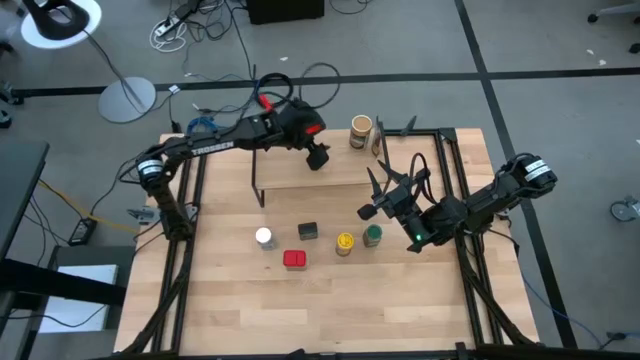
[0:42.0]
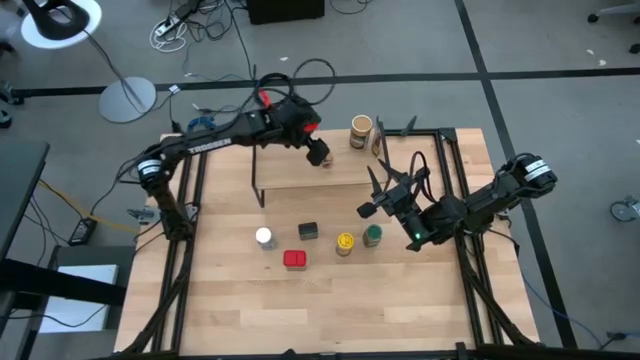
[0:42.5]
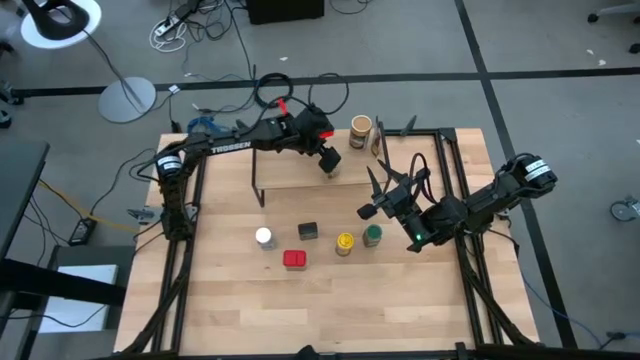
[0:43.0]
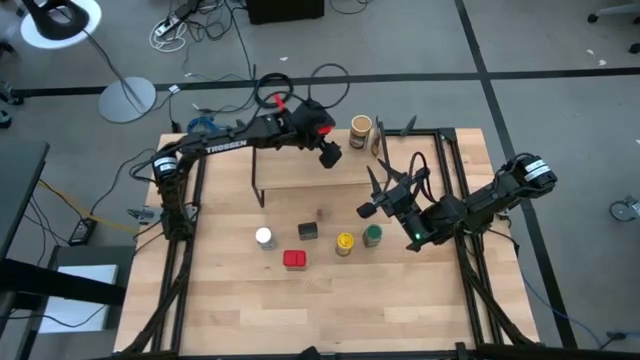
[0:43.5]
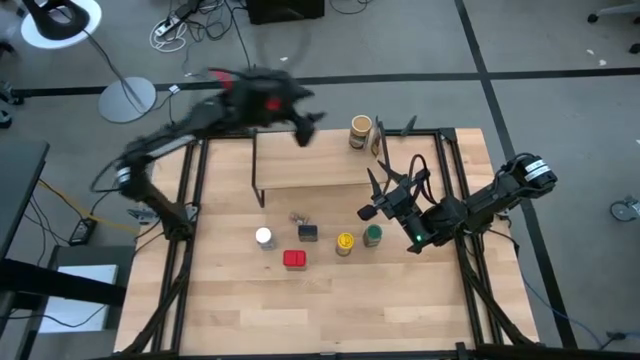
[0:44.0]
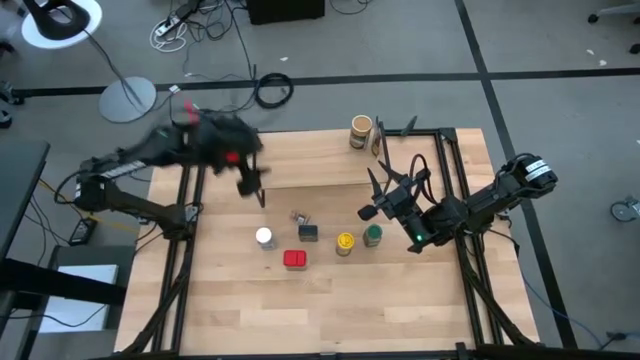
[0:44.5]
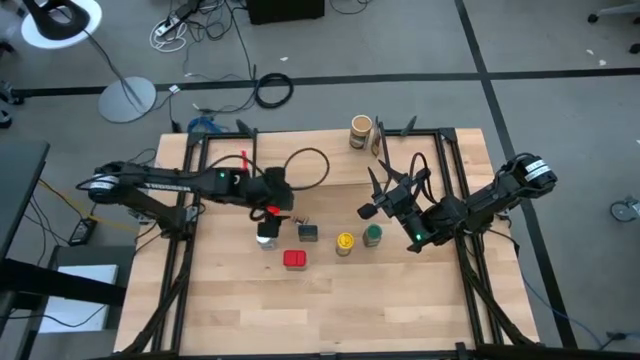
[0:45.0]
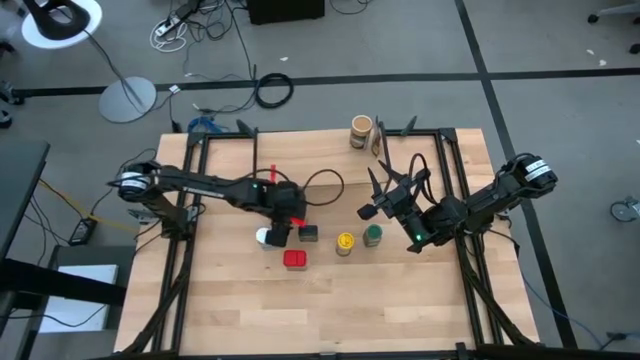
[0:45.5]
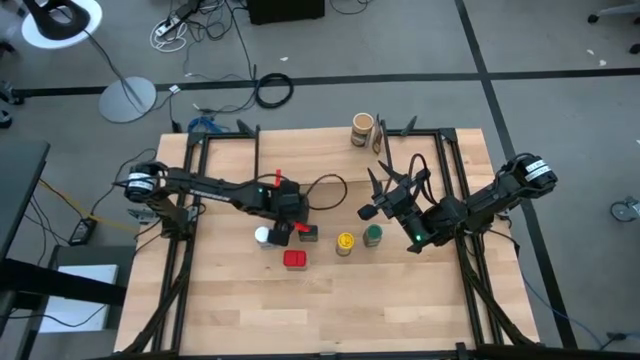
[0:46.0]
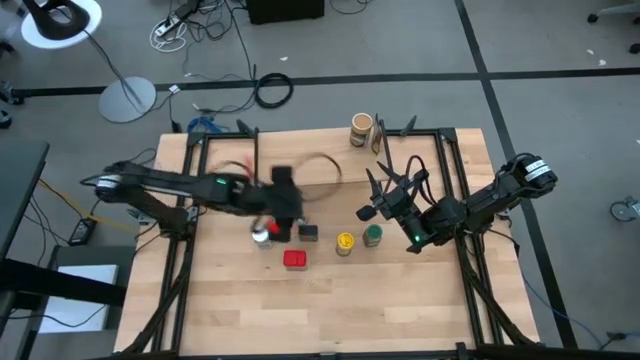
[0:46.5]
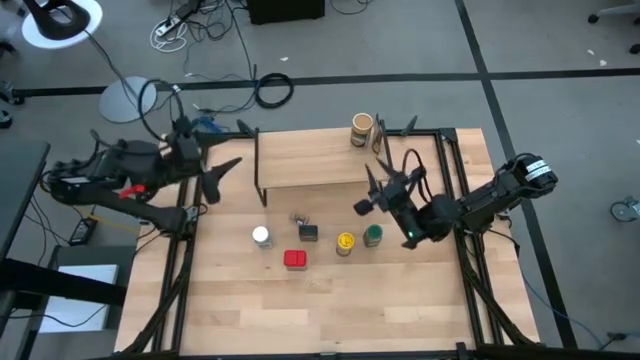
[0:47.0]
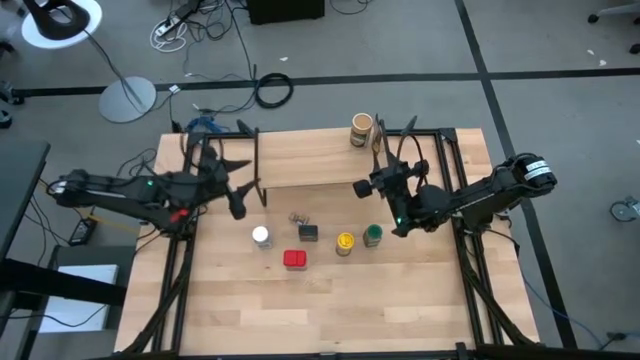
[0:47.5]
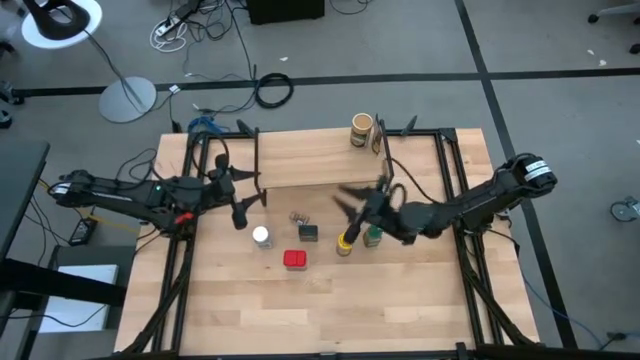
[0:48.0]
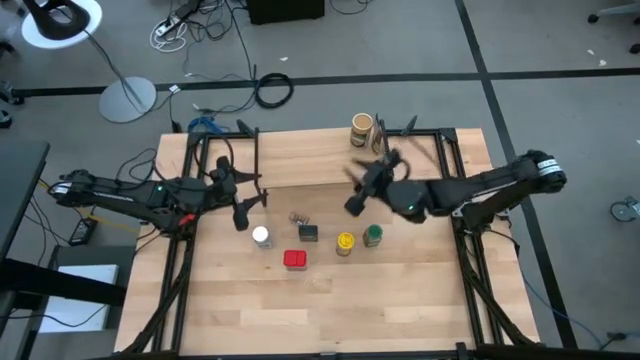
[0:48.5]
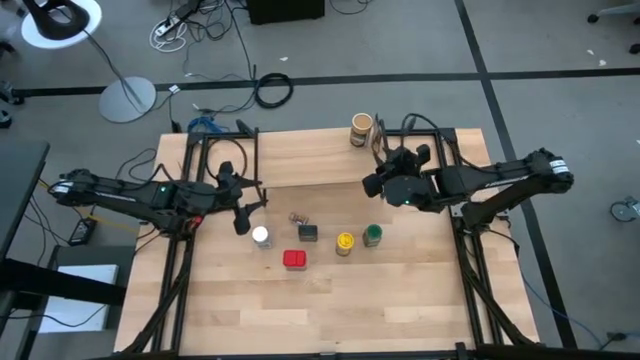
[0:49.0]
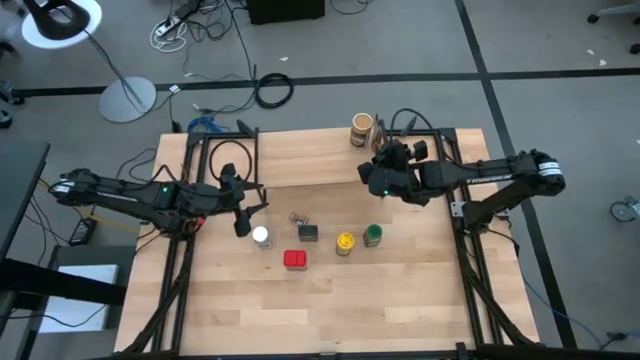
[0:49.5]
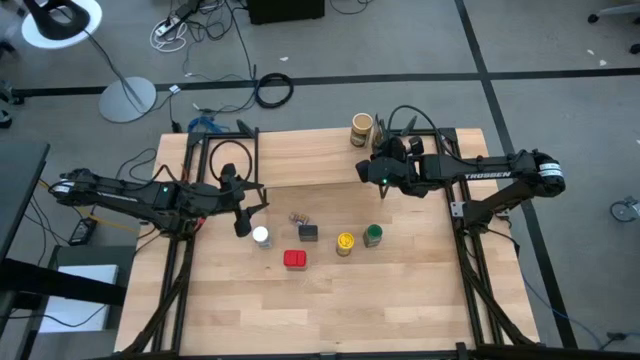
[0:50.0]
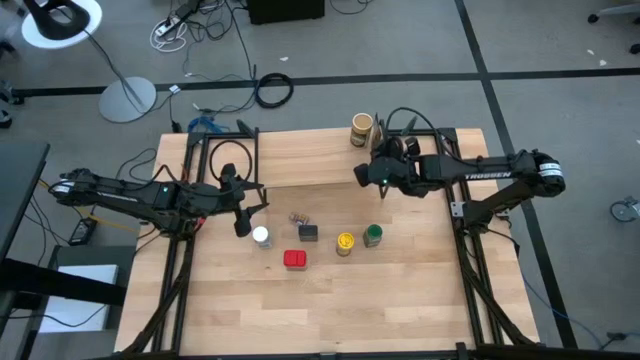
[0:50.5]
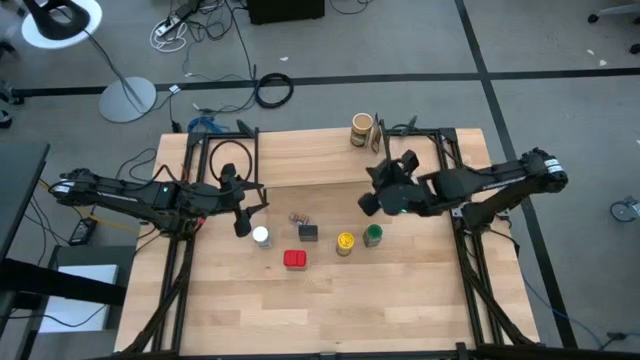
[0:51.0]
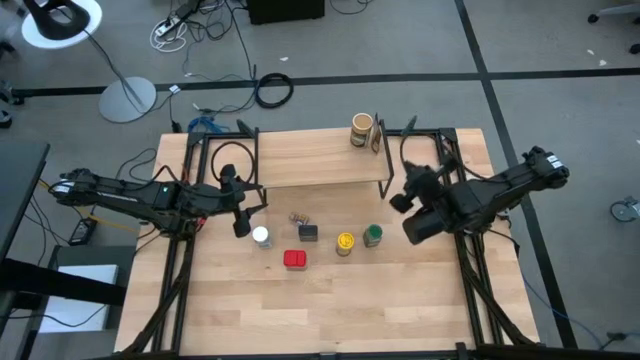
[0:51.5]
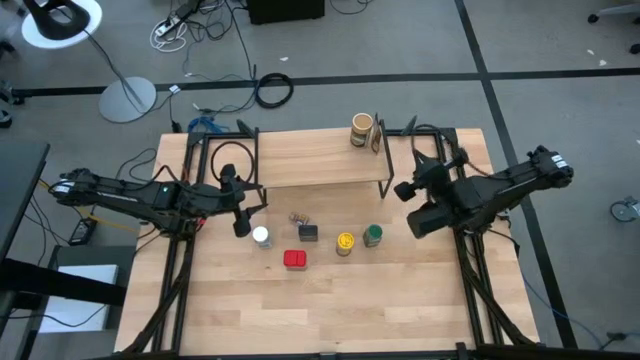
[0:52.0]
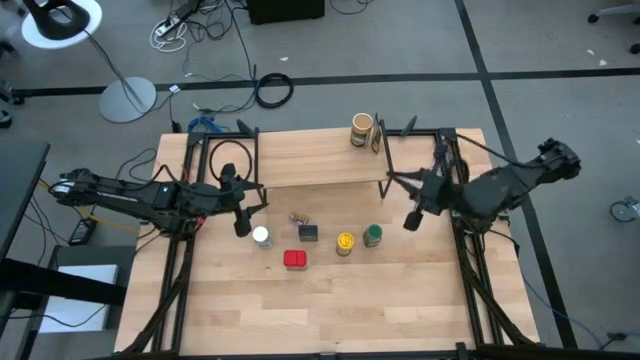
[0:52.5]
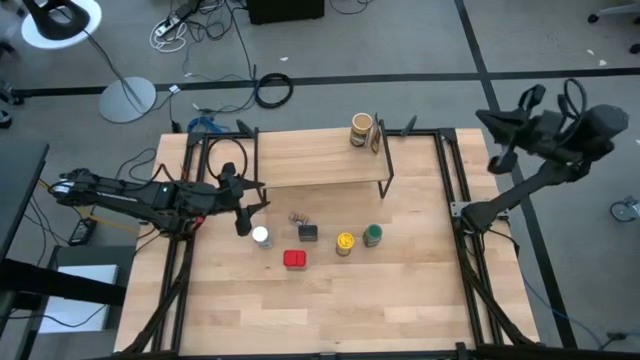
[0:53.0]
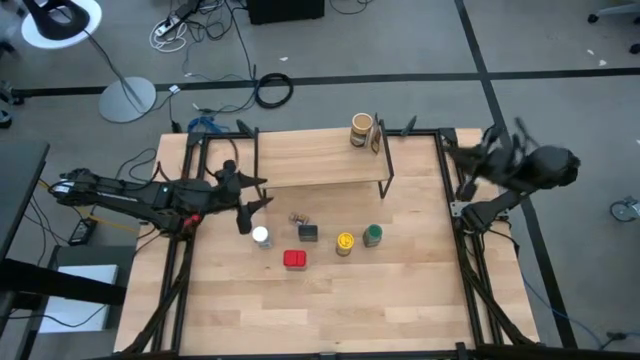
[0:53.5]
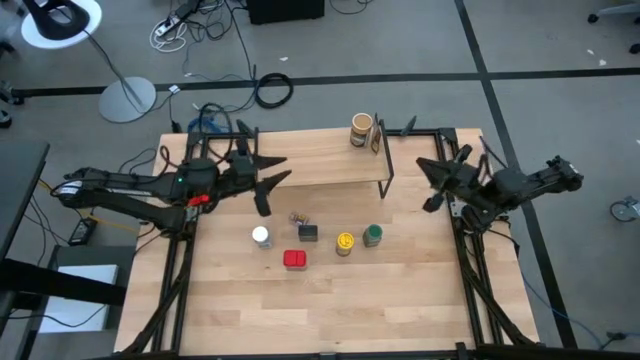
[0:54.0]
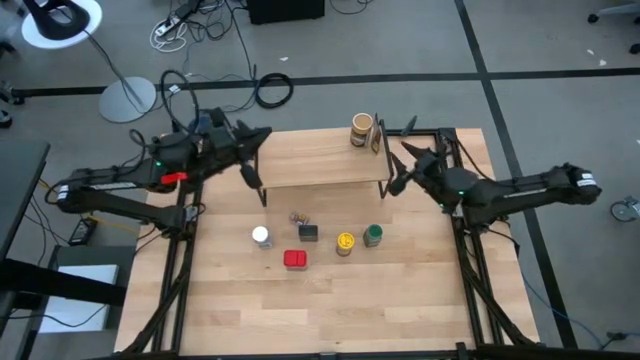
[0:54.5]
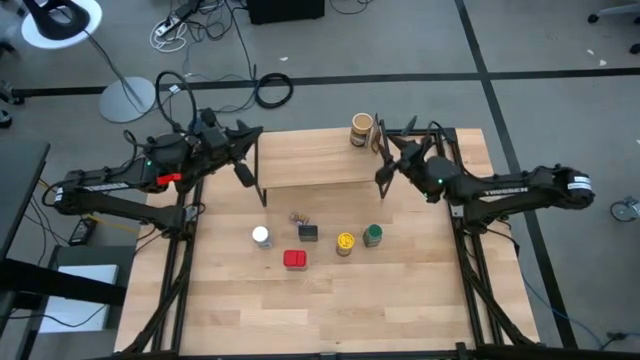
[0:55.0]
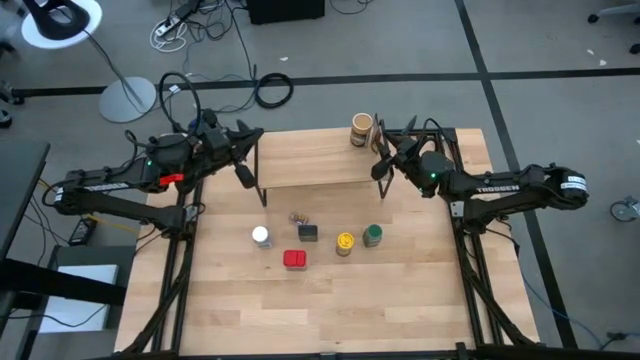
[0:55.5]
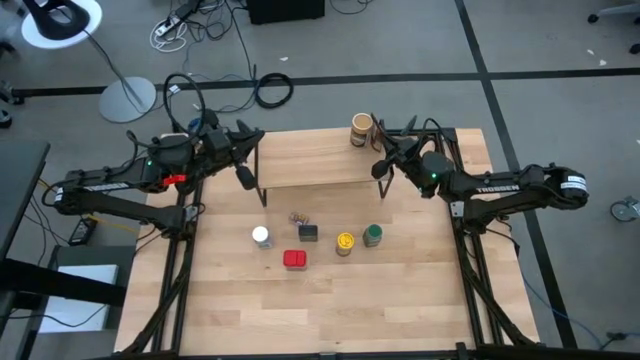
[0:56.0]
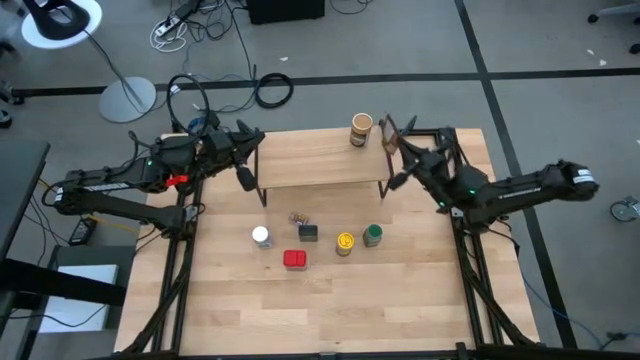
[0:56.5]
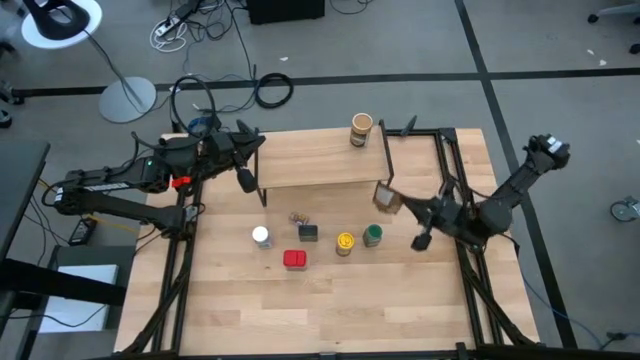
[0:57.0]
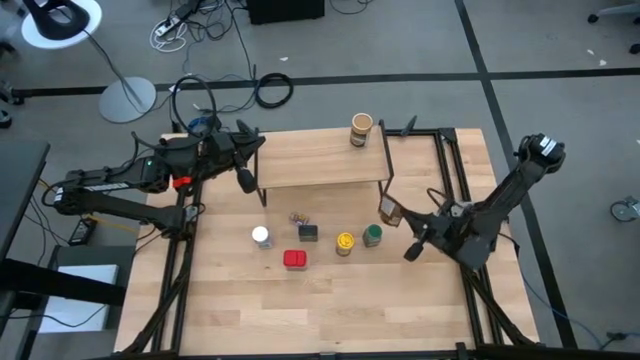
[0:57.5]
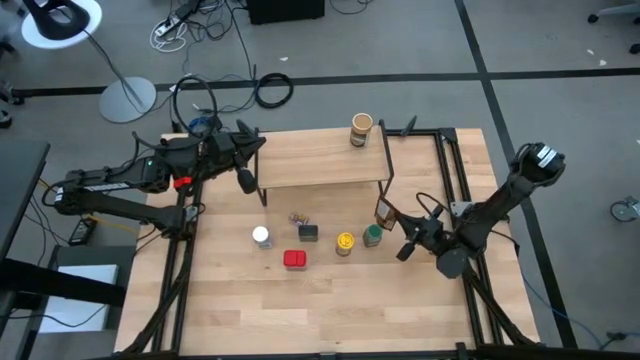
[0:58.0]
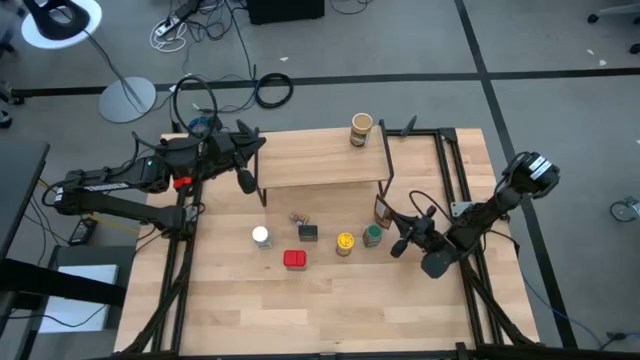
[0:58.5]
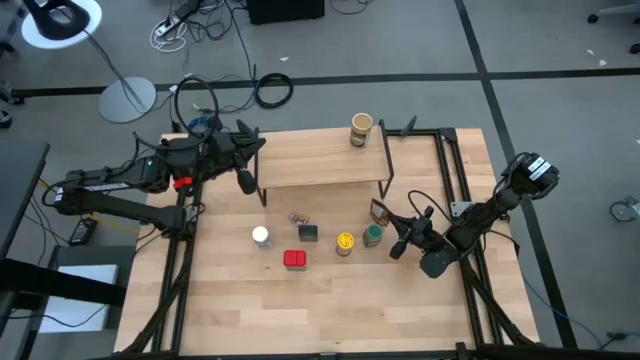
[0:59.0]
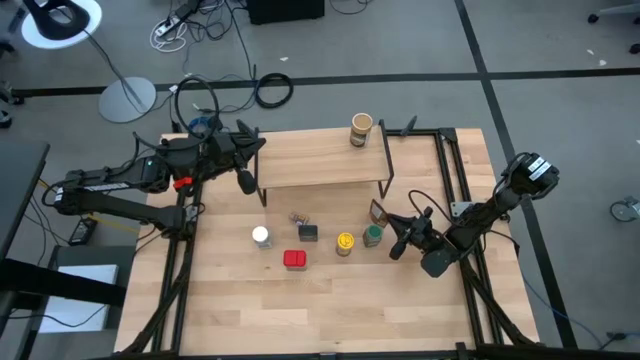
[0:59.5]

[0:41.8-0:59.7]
Task: Shelf spices
Remove the orange seasoning pack from the shelf

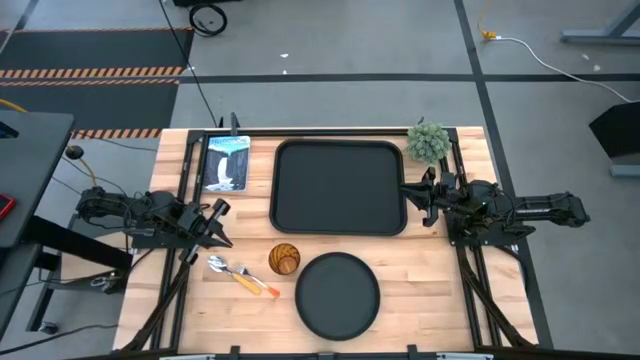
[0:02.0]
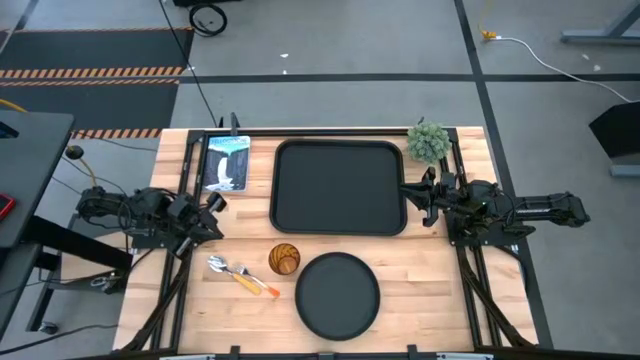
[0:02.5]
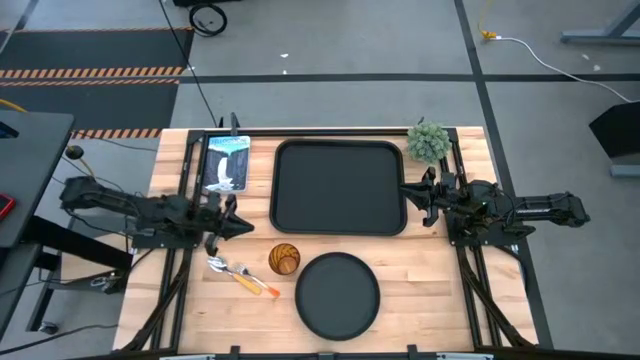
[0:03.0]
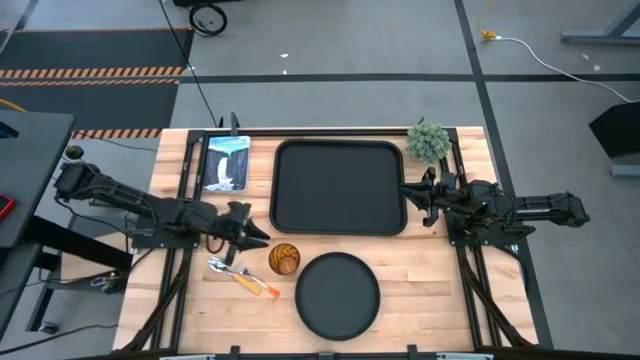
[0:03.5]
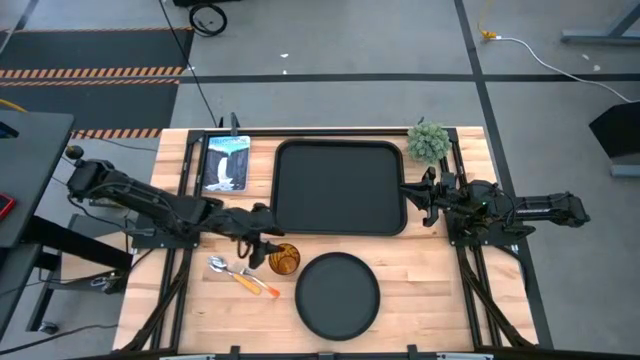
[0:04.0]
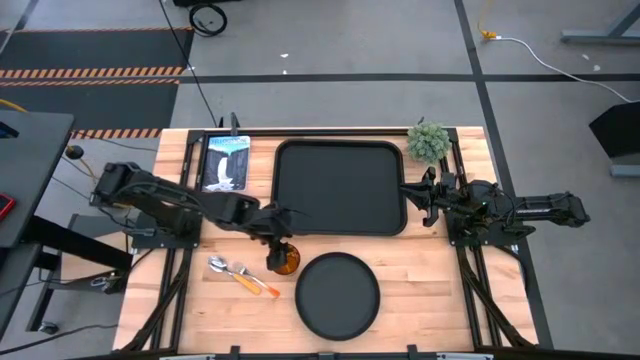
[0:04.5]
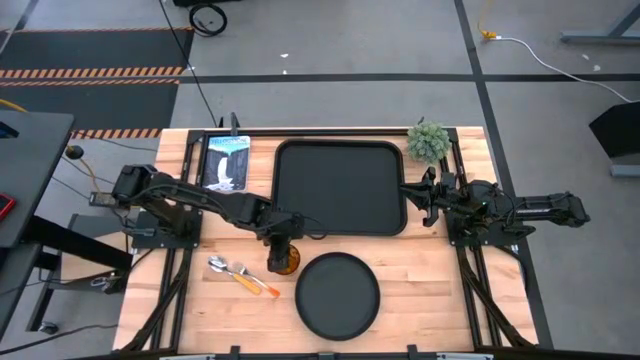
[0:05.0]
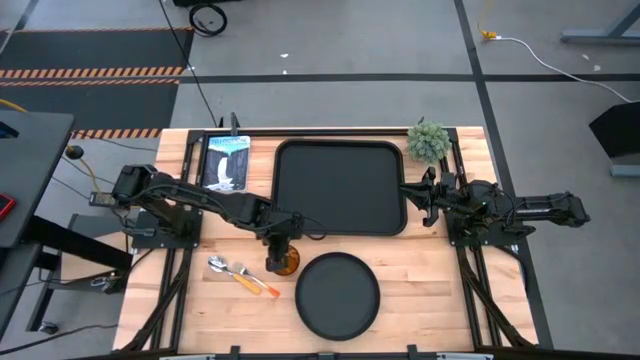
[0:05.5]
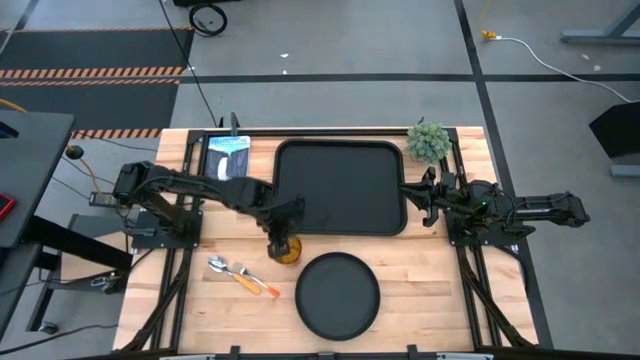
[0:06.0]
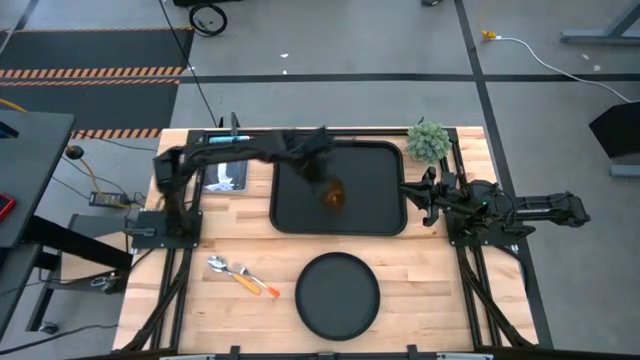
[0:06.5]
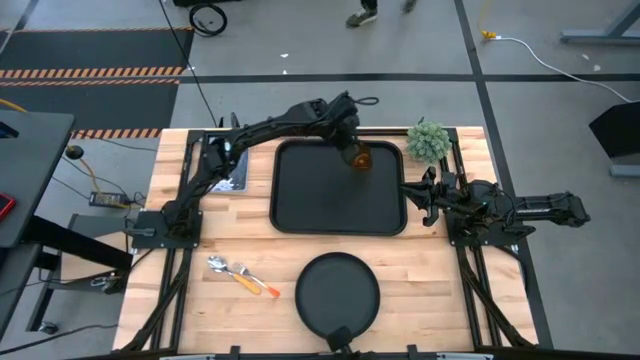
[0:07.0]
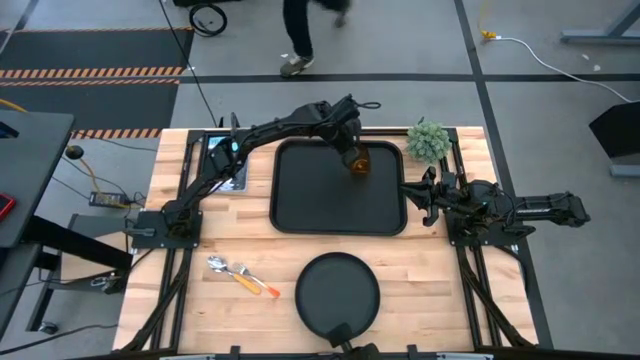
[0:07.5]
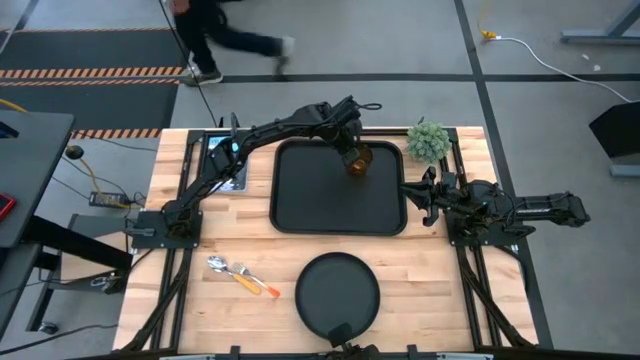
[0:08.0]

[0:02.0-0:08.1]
Task: Pick and place plate/cup/fork/spoon on tray
Put the orange cup onto the black tray
